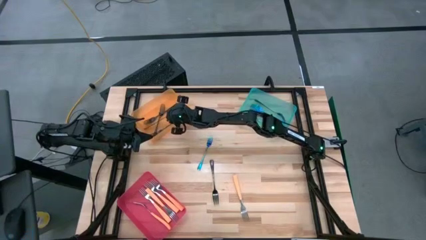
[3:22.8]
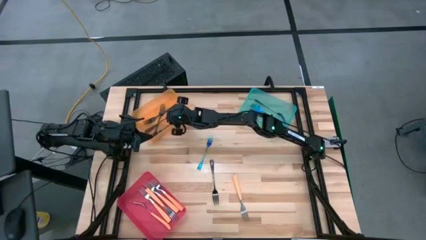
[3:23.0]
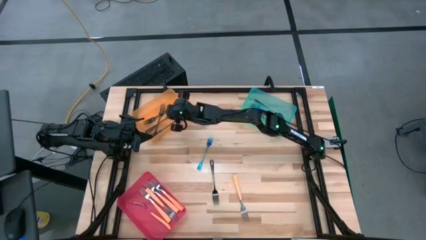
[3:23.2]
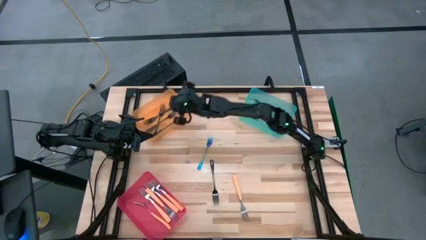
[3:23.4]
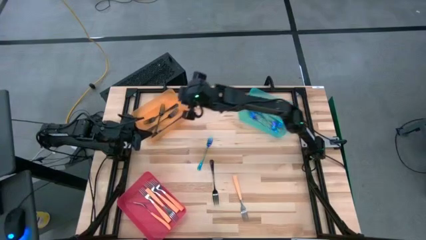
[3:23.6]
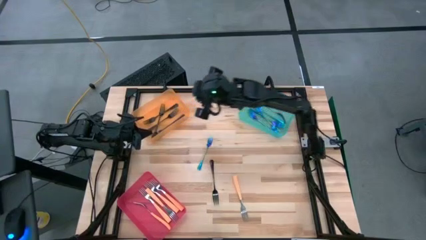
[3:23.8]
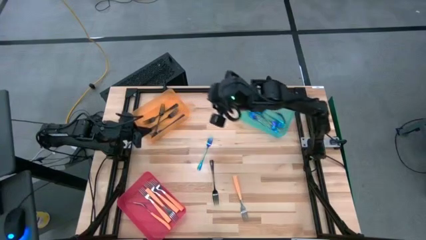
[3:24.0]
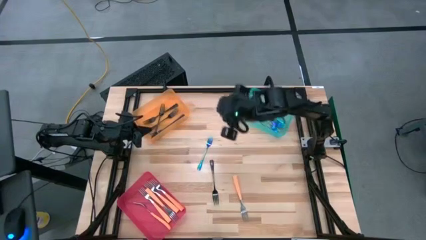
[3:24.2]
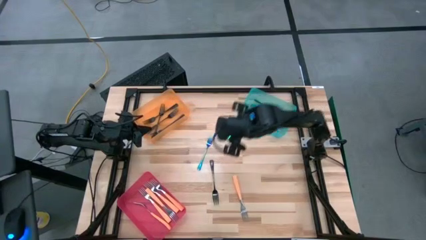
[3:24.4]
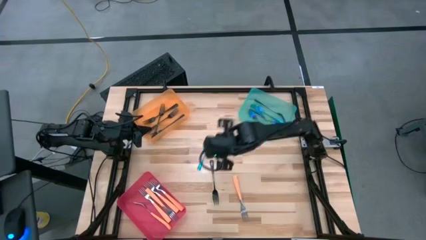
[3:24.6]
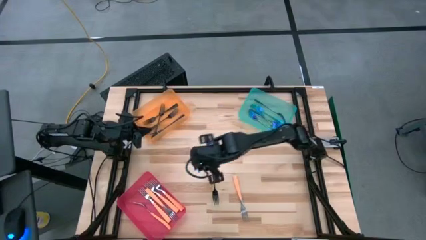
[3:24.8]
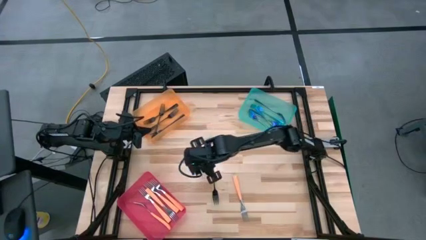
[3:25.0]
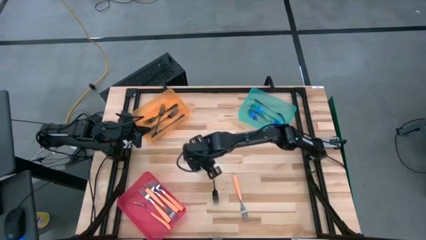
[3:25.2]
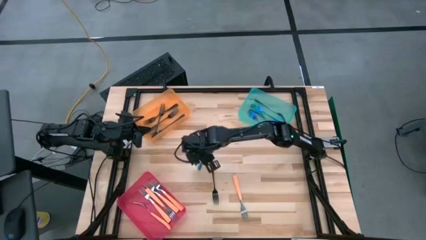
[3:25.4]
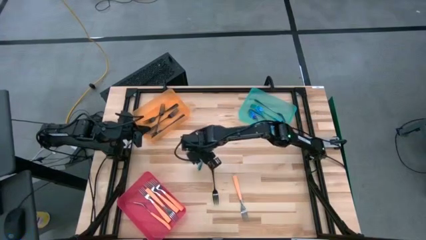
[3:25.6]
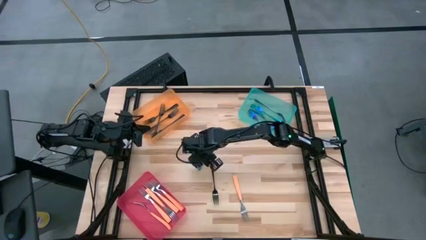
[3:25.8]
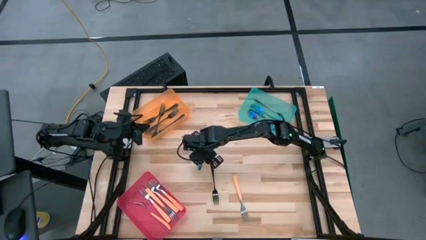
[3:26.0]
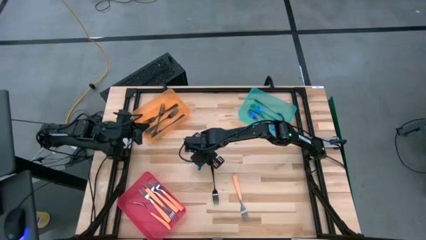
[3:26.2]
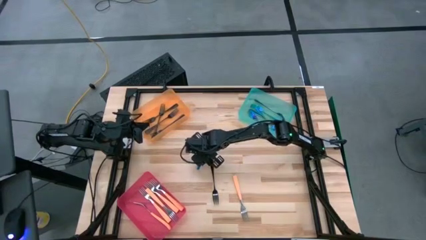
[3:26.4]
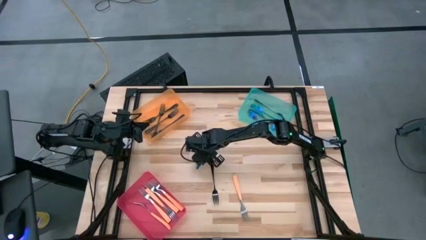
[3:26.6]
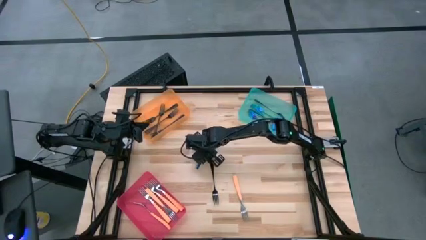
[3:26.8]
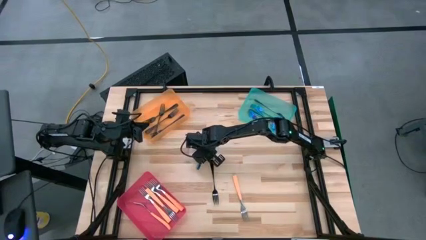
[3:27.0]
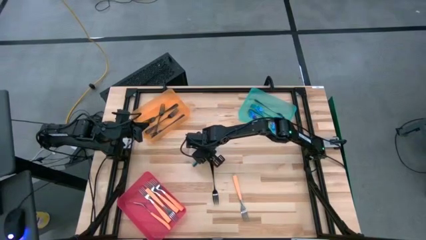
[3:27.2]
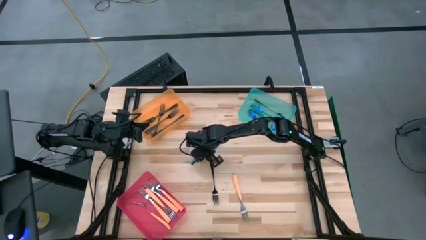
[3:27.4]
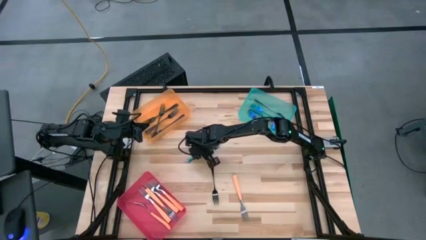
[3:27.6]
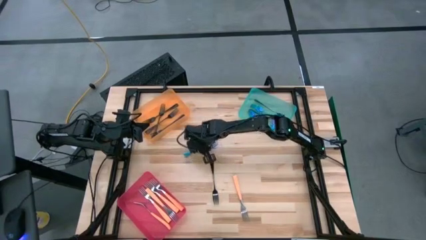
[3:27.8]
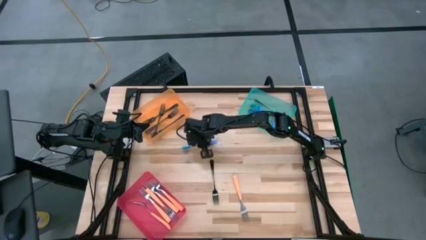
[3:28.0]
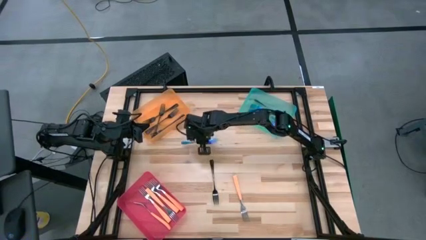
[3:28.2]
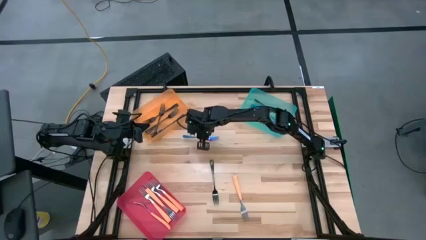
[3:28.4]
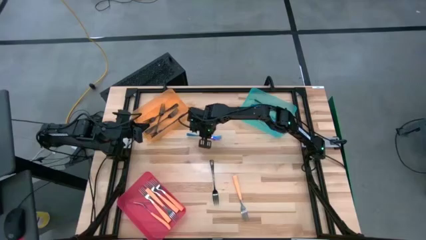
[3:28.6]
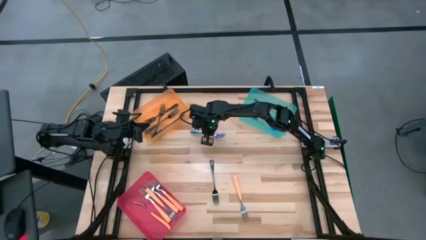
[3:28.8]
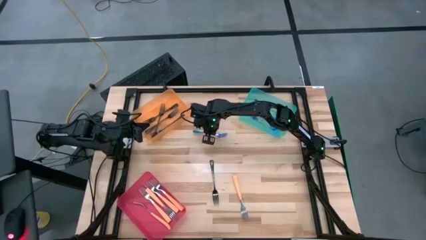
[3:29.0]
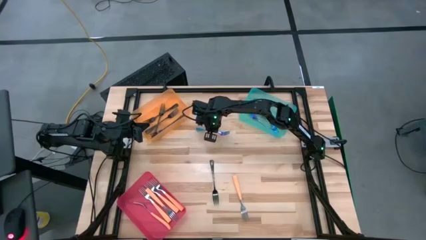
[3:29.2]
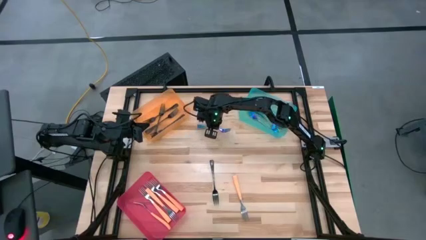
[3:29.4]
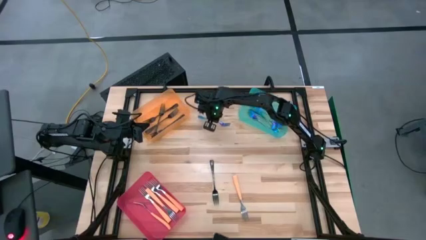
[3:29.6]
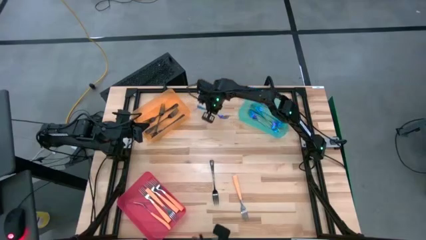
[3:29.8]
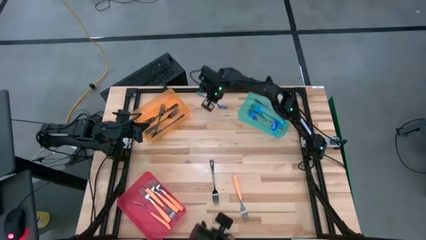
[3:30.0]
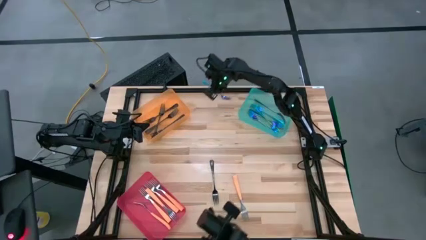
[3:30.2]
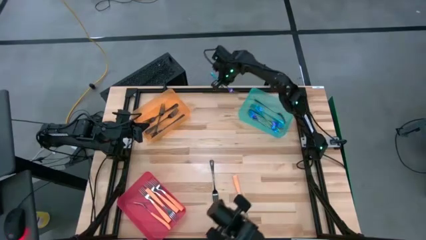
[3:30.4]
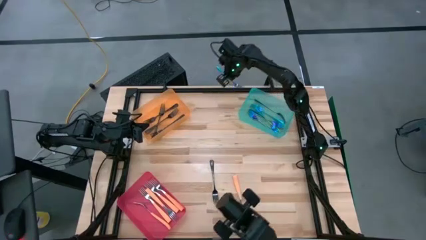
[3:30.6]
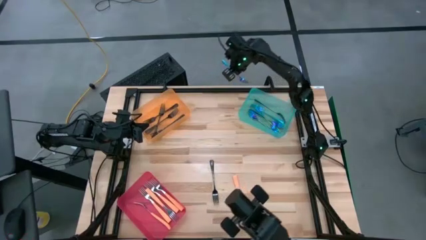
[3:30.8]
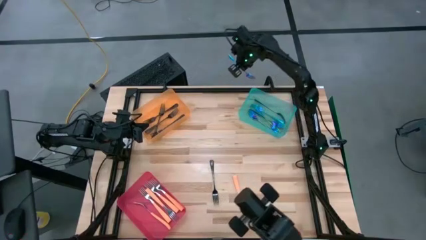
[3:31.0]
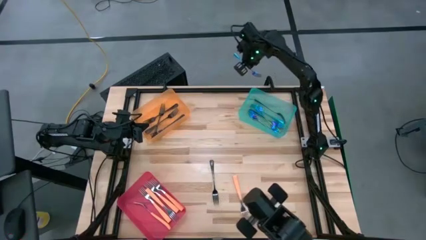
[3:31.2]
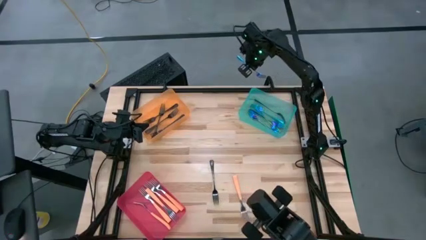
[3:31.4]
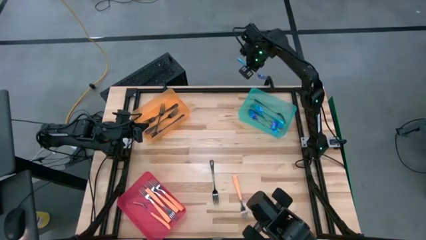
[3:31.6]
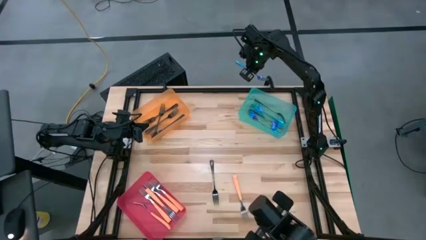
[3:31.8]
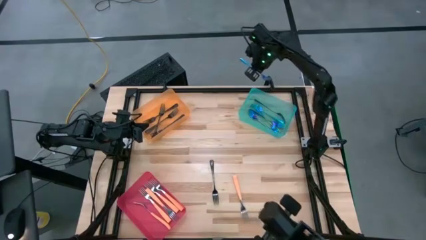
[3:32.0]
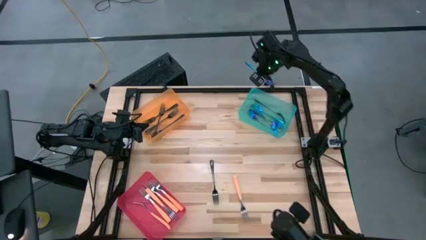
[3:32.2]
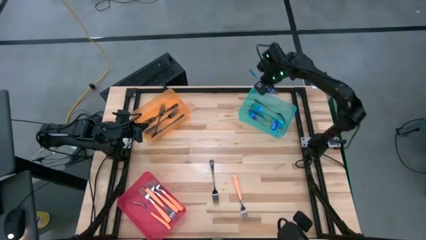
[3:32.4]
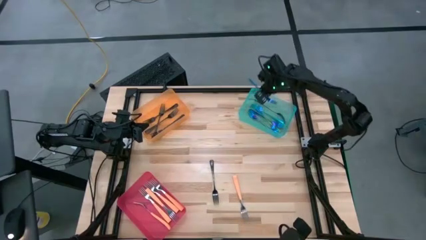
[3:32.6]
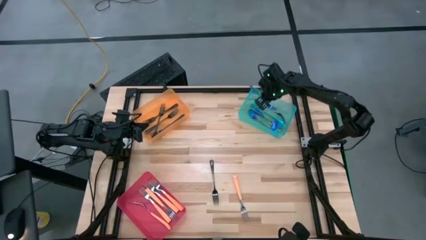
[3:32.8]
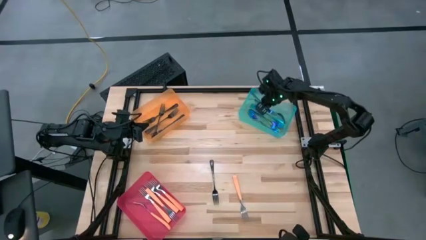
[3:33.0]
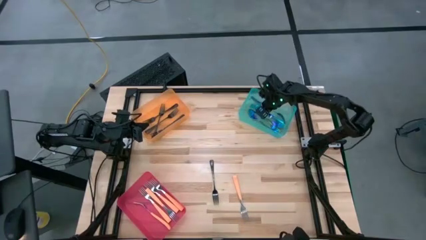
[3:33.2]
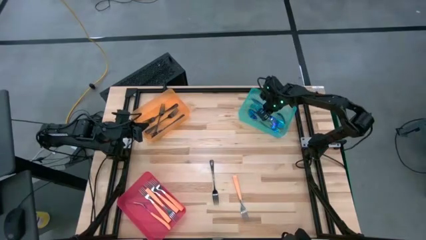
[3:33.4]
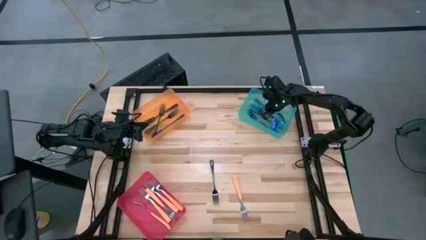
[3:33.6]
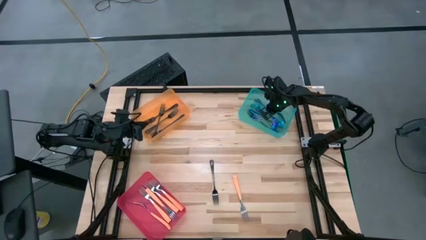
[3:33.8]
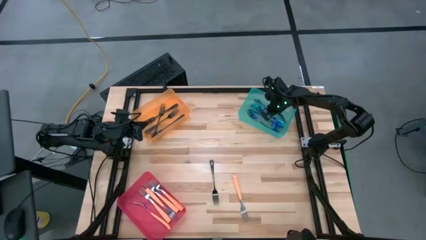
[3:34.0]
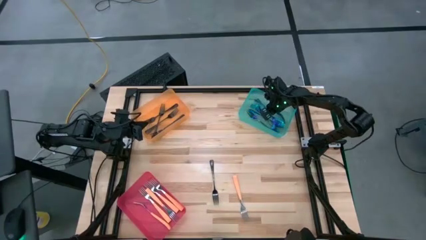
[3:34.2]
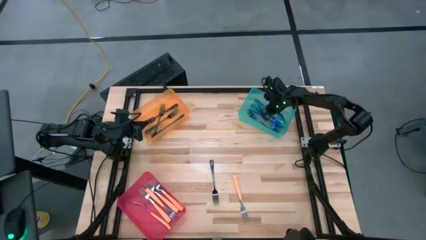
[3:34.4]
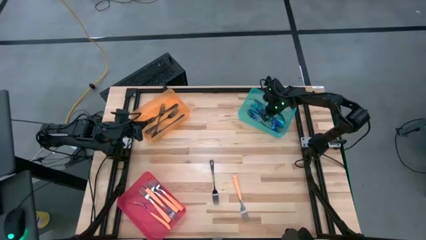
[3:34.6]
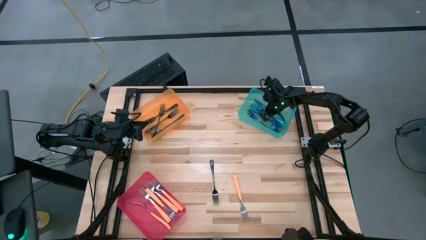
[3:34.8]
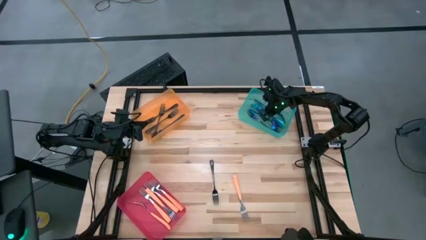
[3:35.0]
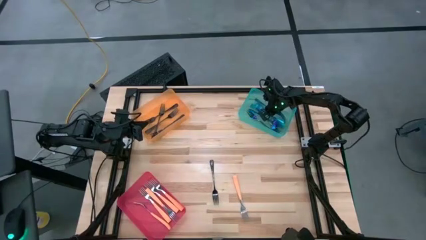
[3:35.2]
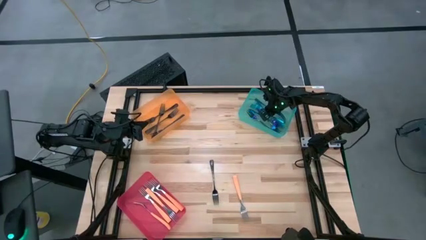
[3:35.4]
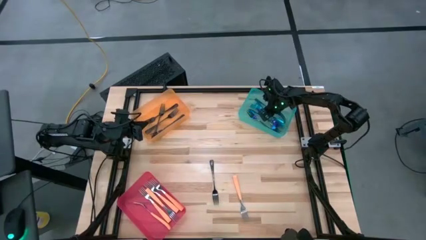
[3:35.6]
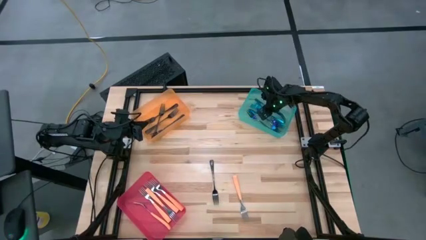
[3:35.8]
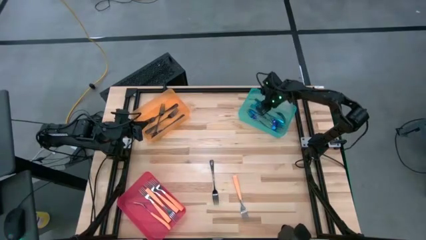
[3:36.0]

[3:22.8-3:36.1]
Task: Sort silverware by color (type)
Put the iridescent fork into the green bin

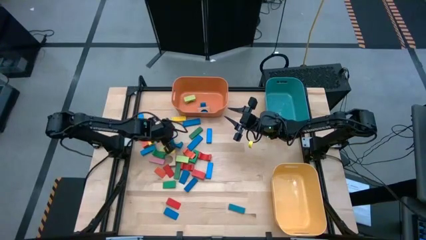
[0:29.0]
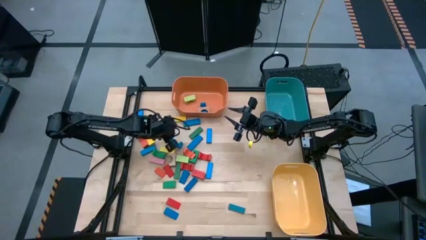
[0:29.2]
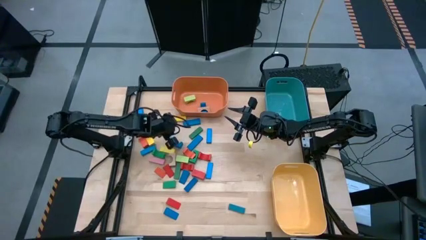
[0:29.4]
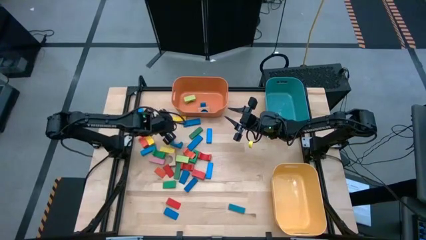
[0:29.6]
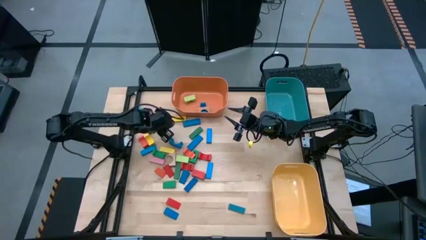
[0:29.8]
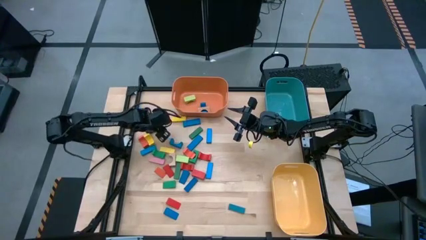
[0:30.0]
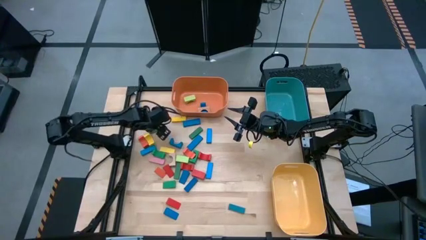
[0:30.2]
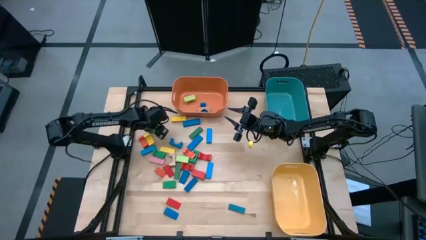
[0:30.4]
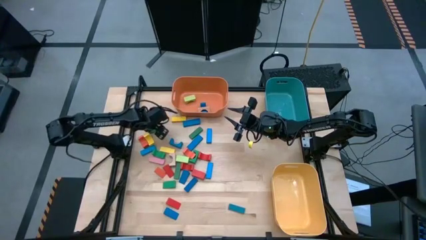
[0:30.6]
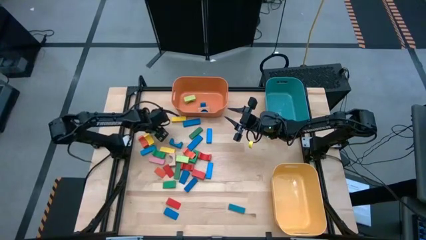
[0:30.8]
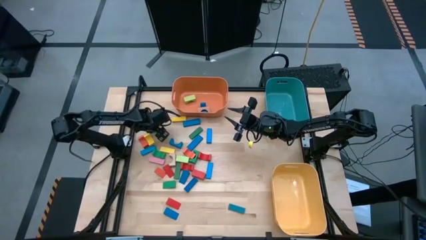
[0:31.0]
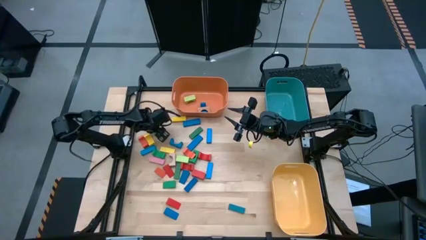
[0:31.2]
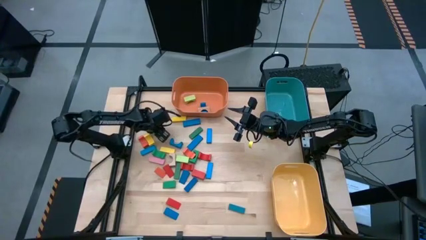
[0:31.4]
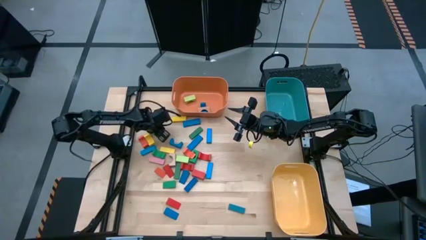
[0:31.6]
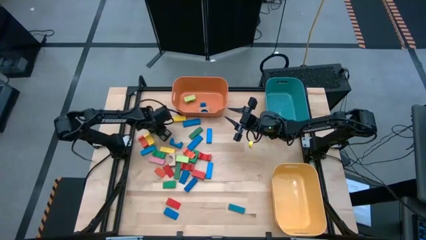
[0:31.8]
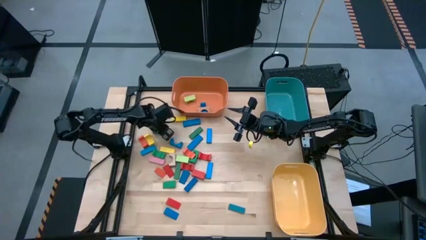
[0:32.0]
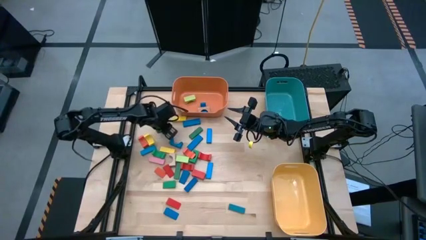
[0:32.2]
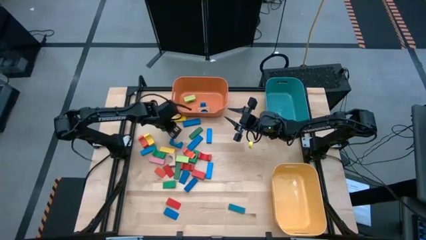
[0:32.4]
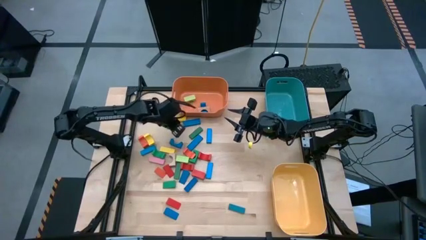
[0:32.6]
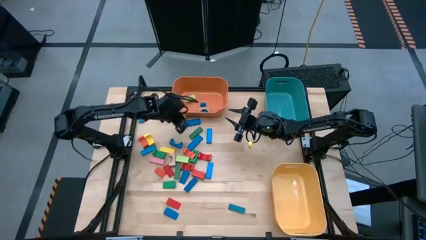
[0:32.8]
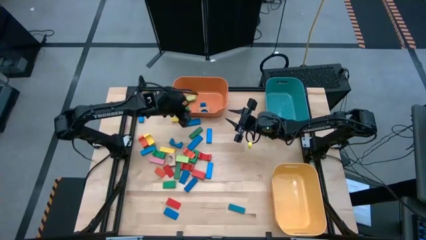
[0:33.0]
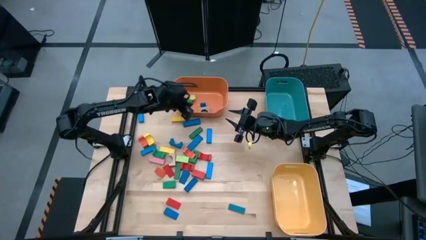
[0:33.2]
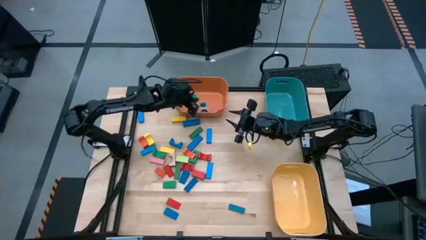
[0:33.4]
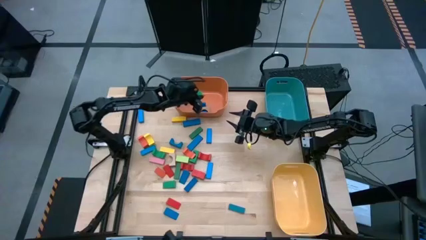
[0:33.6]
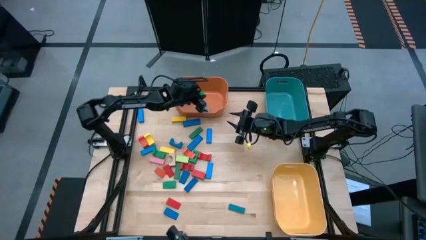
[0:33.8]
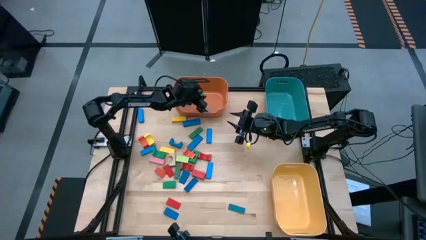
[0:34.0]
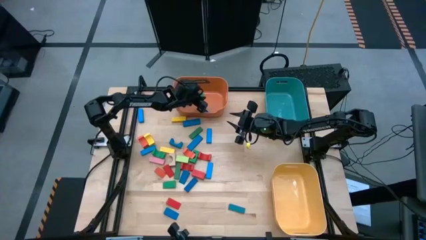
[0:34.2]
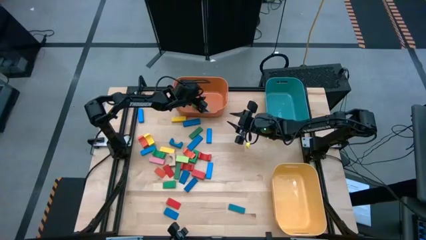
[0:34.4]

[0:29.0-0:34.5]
Task: Sort blocks by size
Put the green arch block into the orange bin
